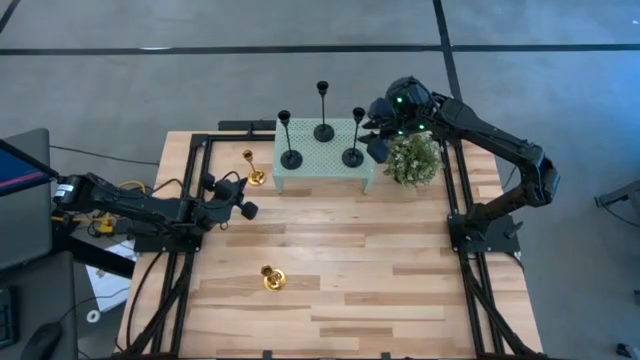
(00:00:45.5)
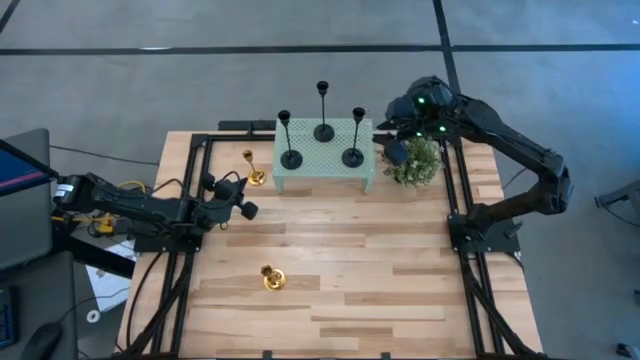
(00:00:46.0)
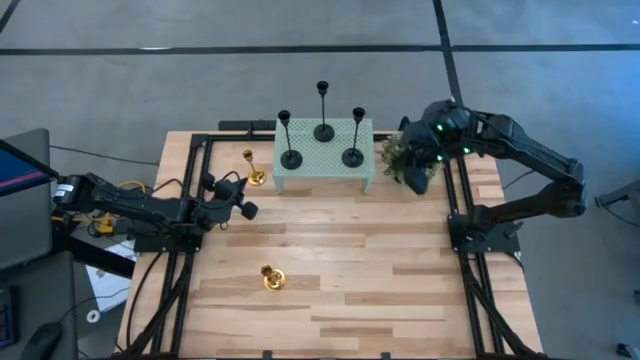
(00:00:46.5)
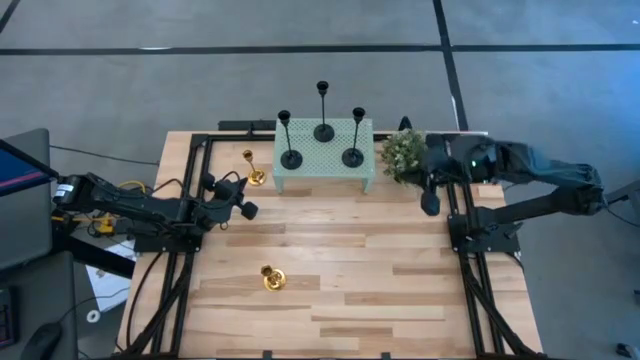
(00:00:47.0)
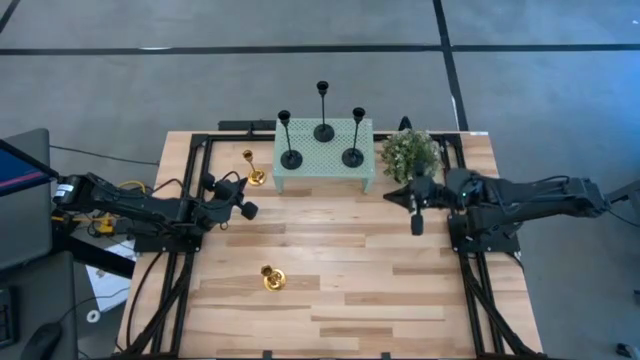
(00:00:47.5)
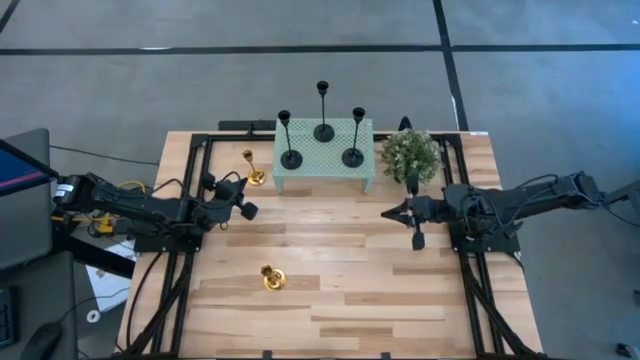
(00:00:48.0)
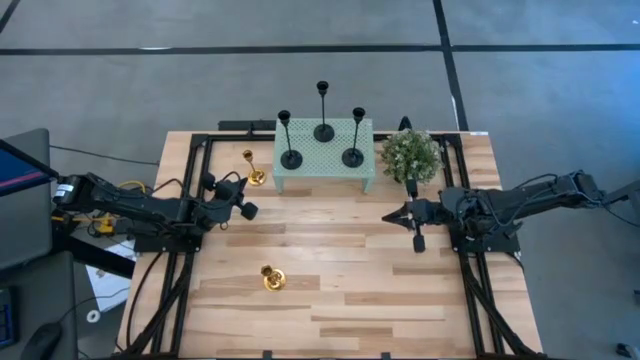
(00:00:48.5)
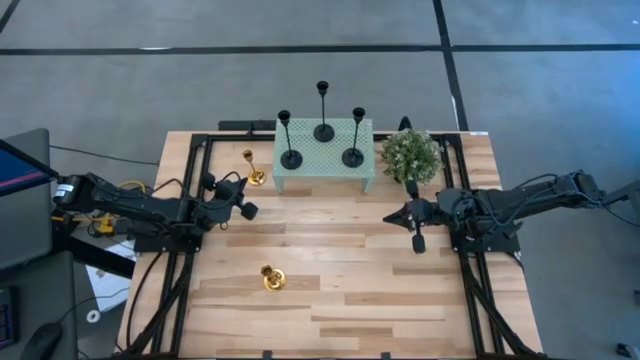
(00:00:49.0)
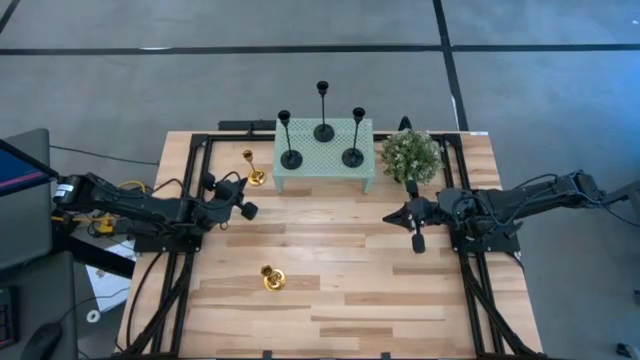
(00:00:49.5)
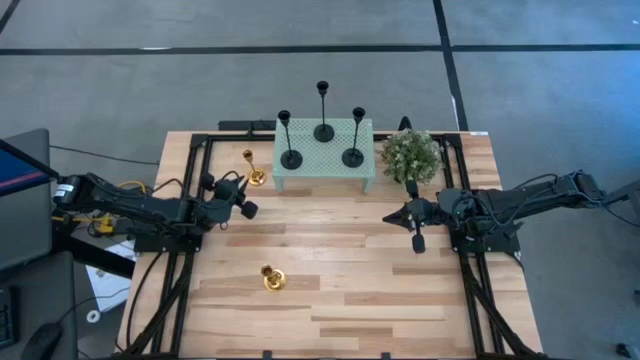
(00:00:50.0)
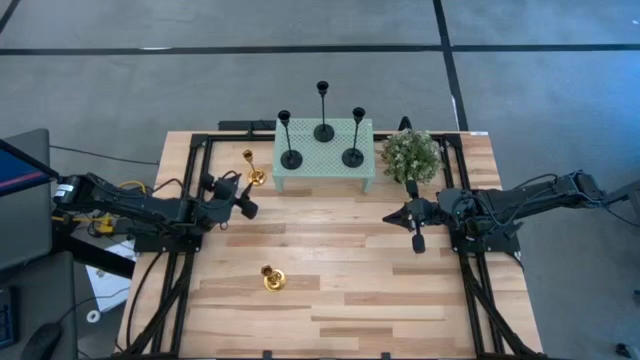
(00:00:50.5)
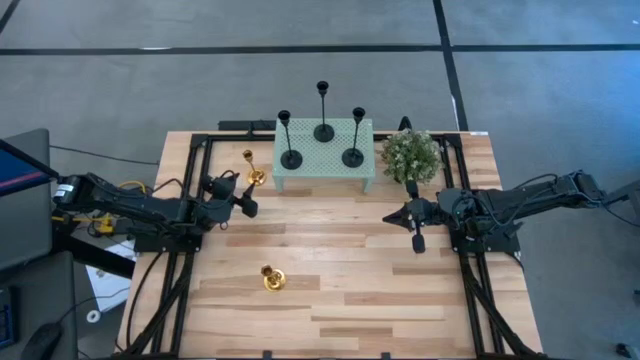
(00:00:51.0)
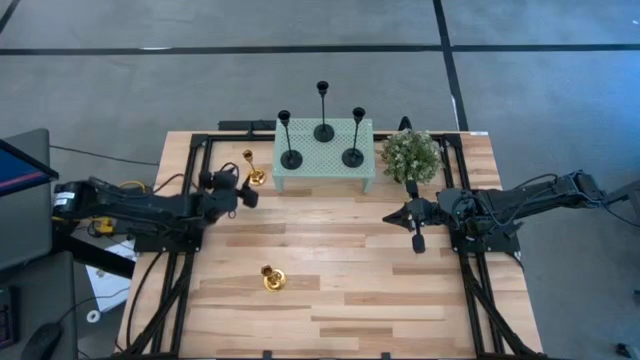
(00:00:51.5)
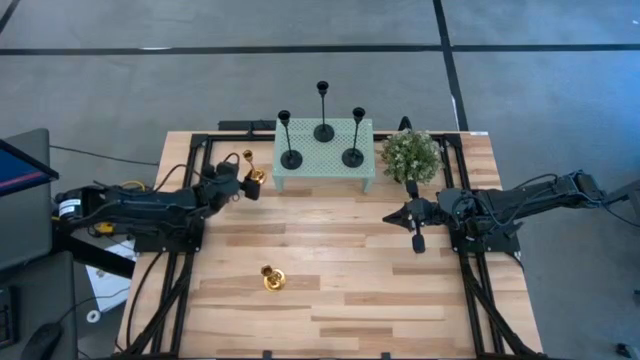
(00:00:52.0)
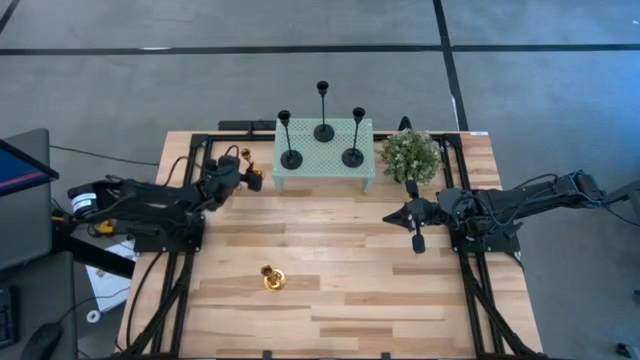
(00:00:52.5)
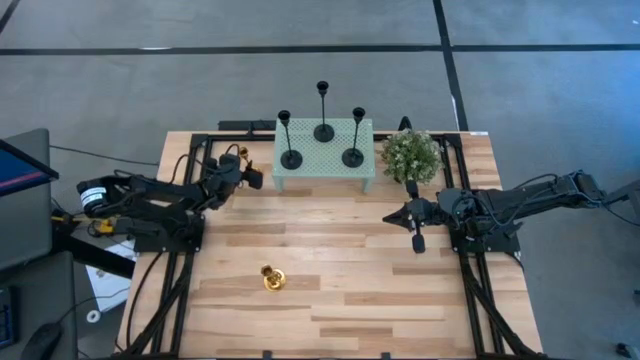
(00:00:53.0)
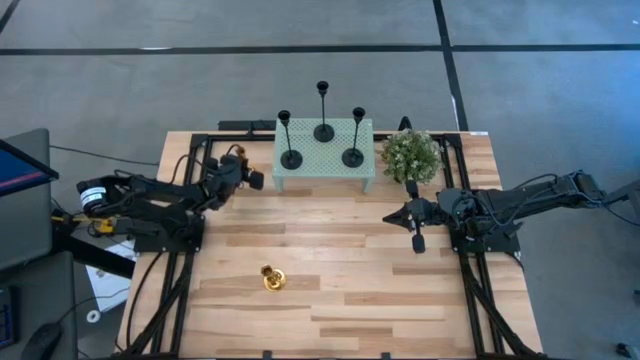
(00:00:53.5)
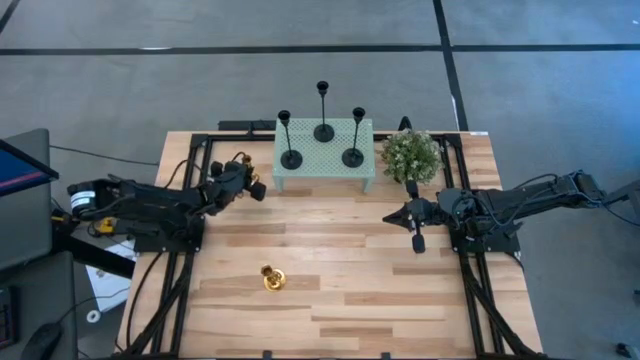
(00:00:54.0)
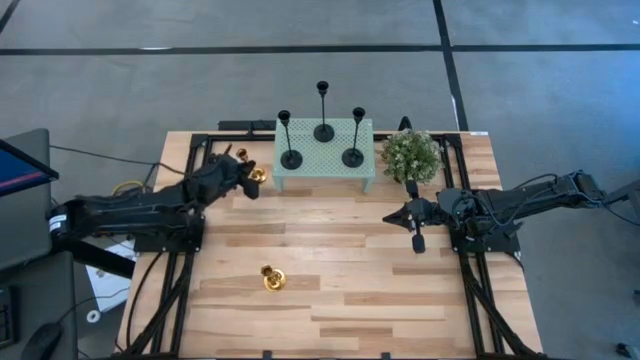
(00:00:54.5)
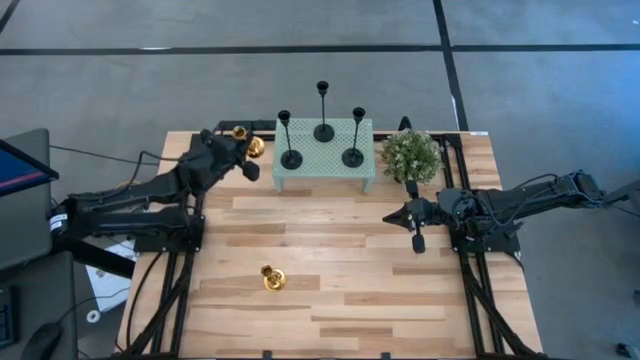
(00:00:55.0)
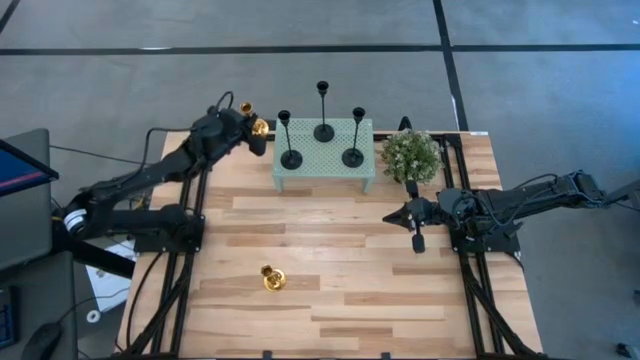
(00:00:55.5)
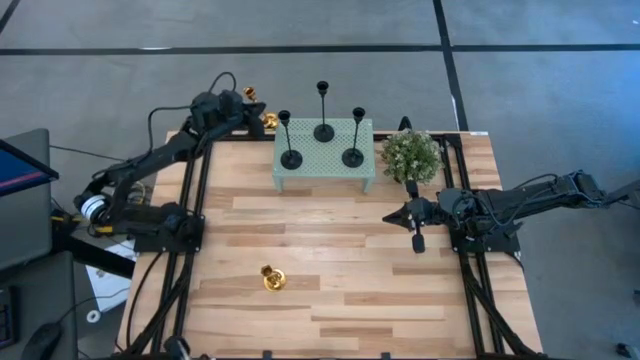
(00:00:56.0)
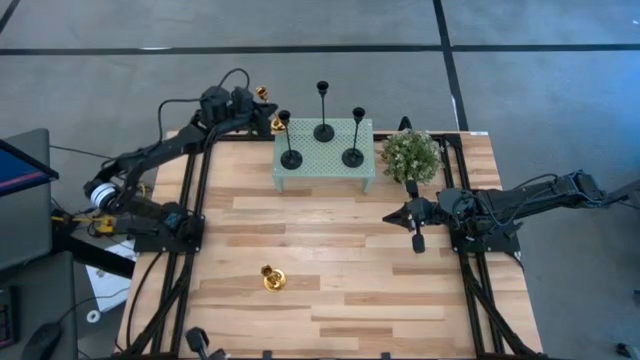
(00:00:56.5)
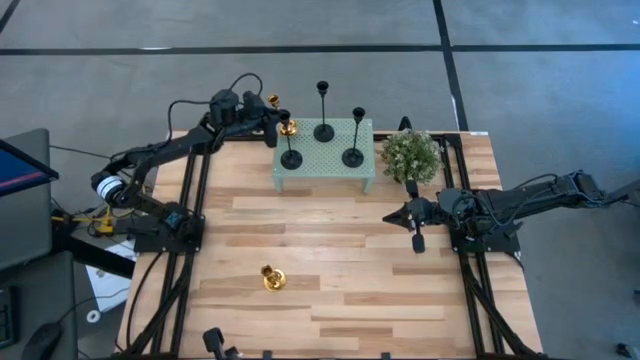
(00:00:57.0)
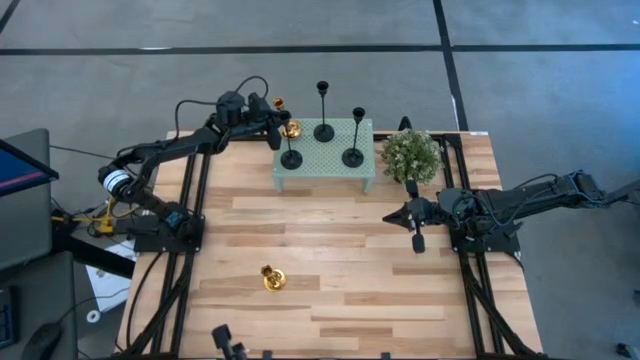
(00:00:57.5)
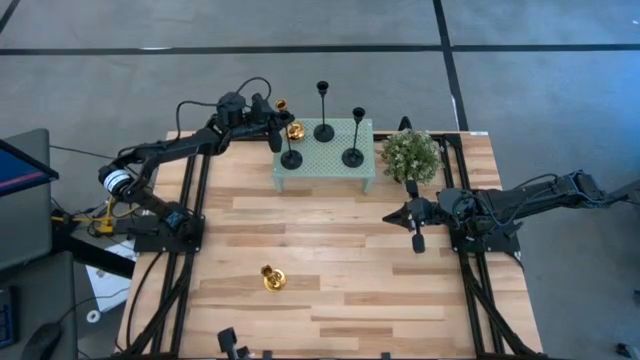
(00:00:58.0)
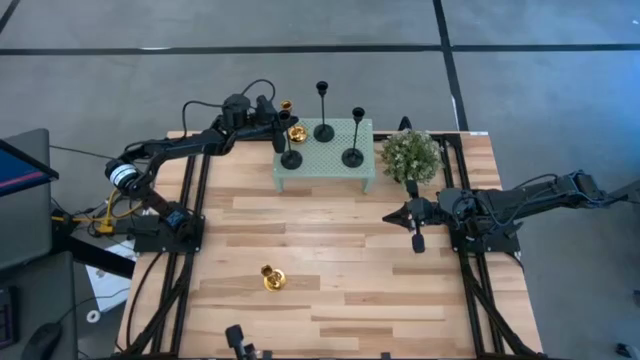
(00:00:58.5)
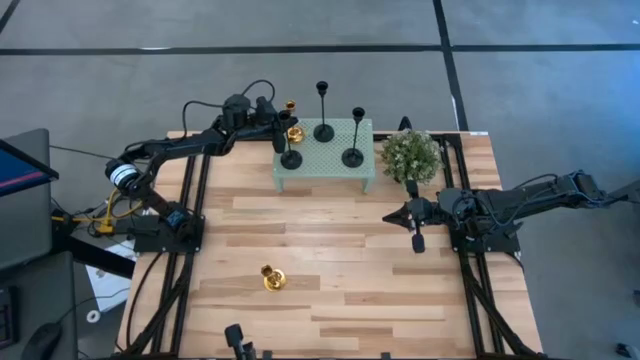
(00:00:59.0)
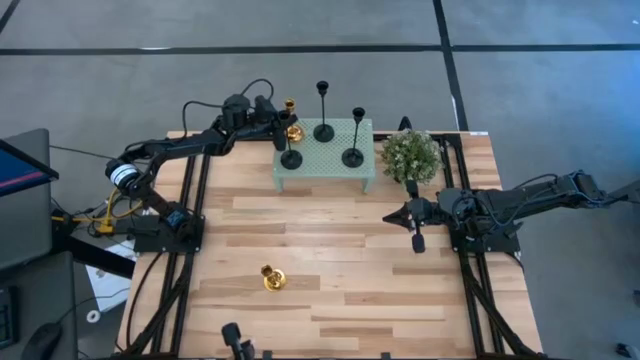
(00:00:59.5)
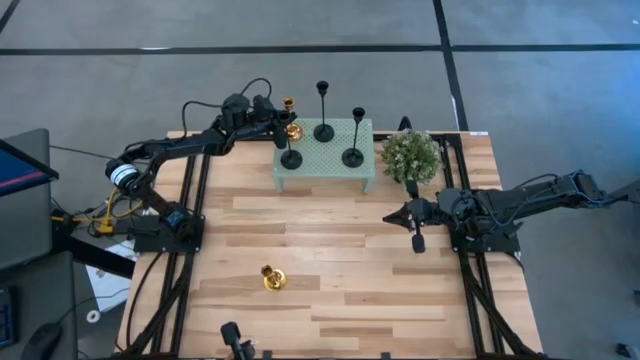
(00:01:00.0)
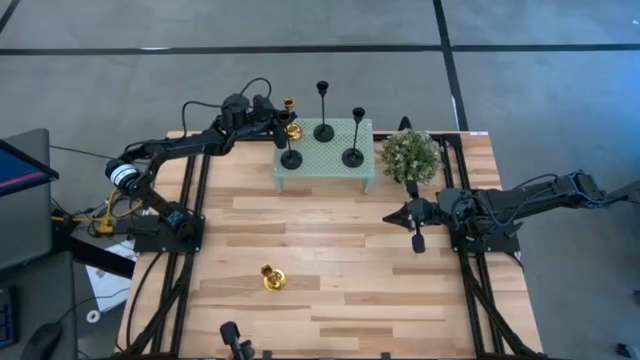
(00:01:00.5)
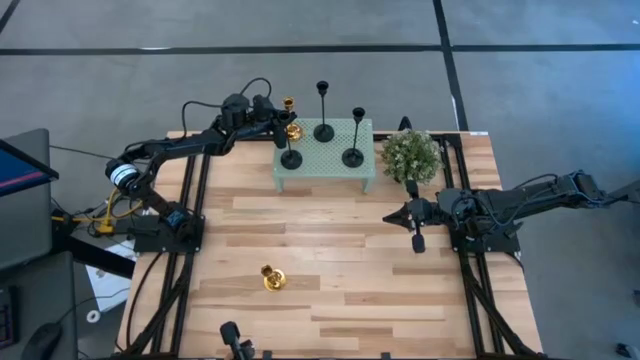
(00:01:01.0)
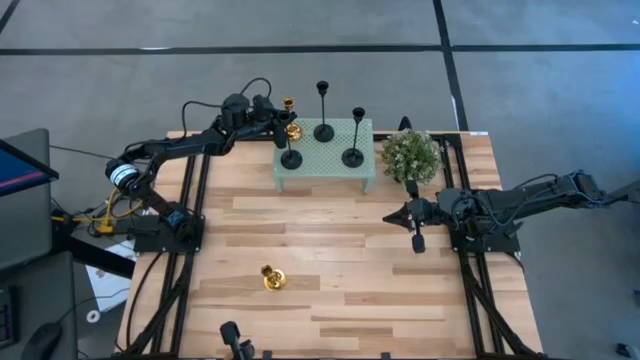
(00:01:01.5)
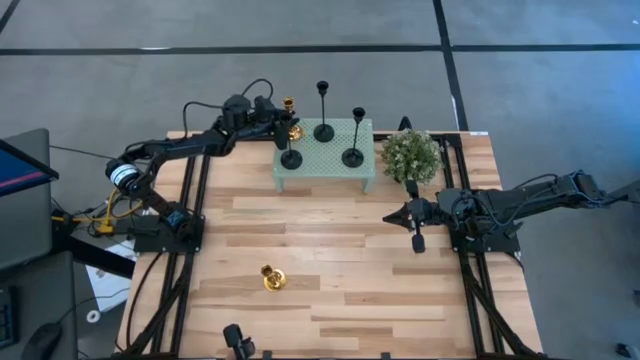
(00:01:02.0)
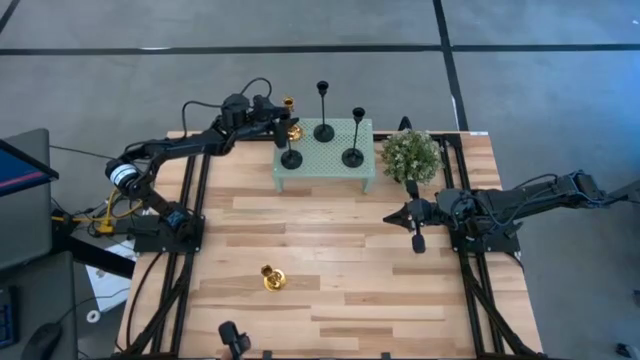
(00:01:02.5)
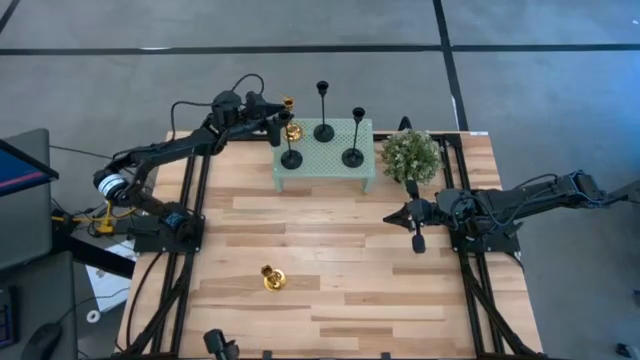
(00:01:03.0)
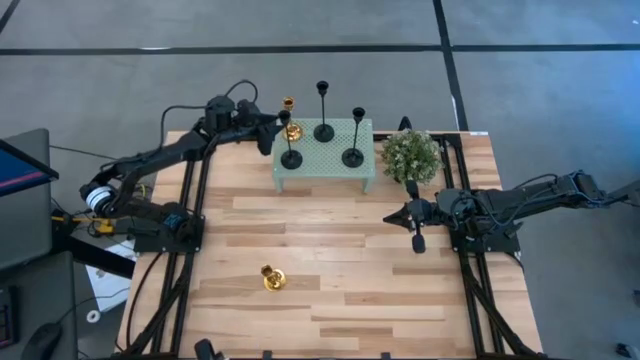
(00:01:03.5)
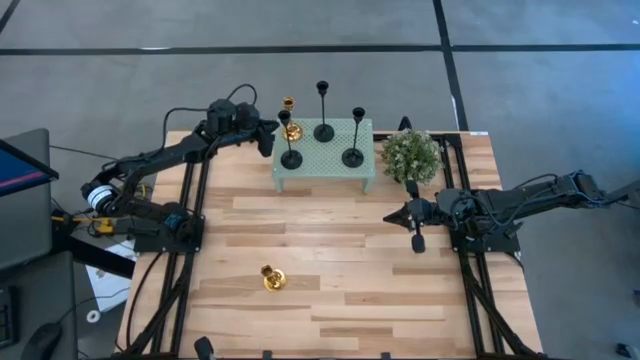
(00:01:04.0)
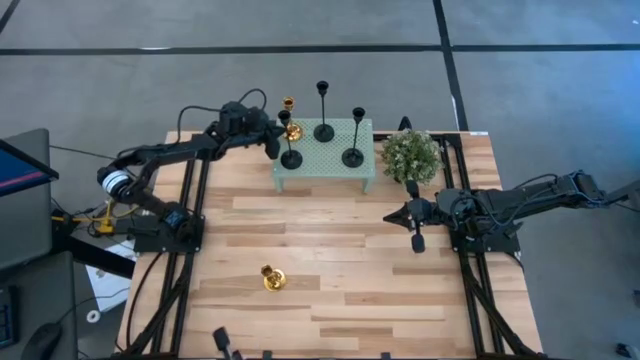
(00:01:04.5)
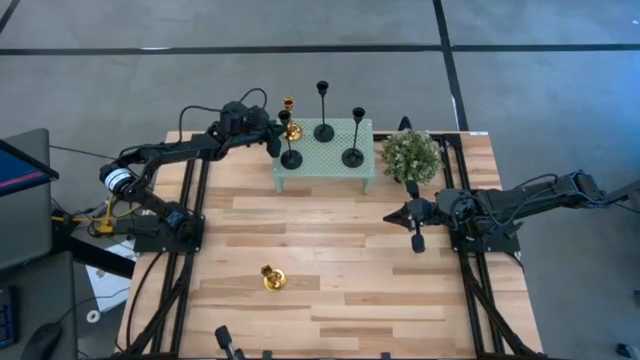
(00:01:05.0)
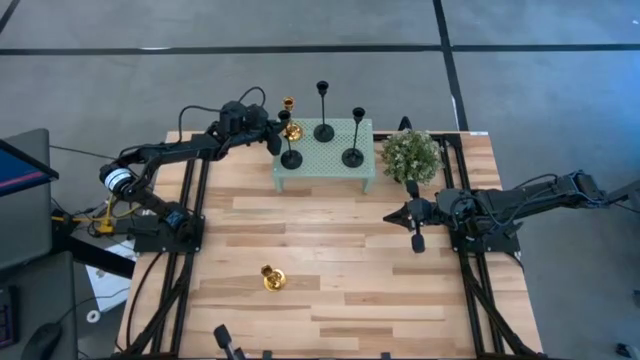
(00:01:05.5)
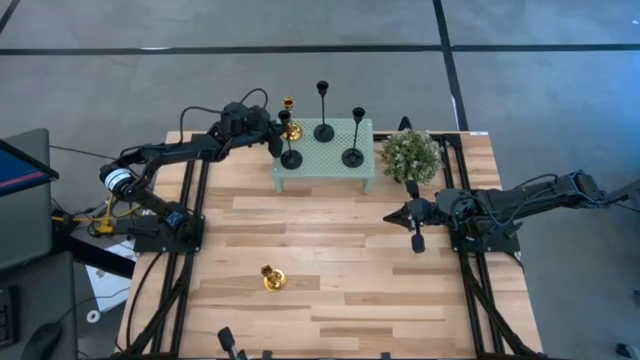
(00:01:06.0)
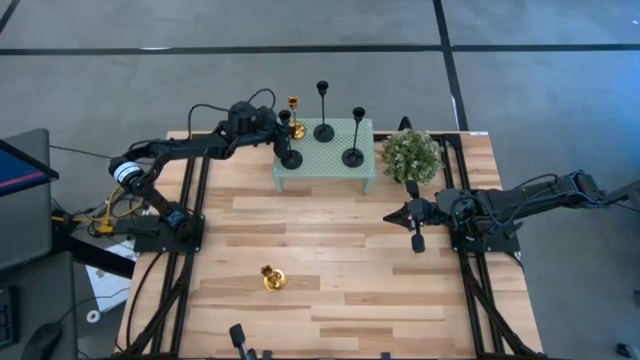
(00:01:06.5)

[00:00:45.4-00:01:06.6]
Task: Pick & Place candle stick holders
Put the top gold candle holder on the shelf
